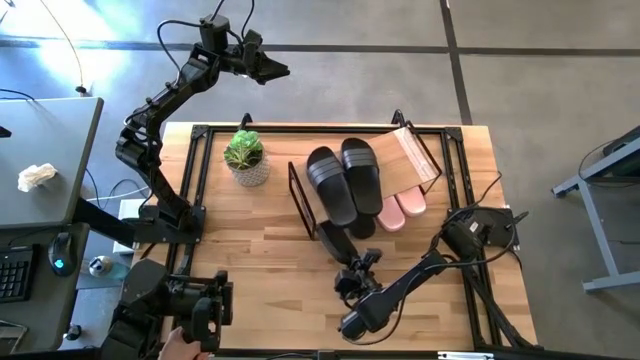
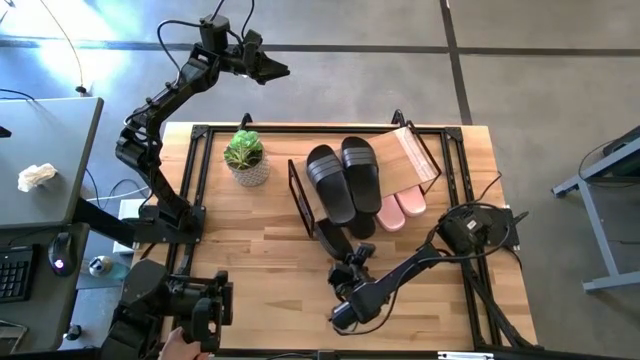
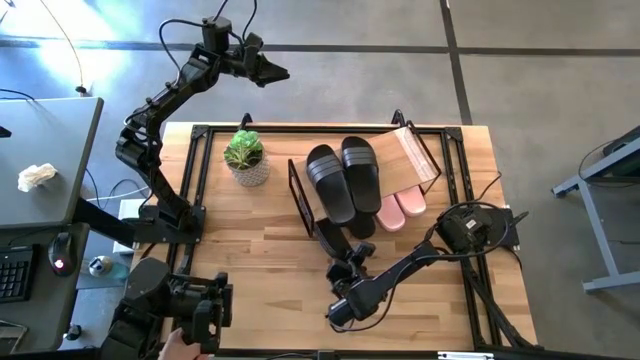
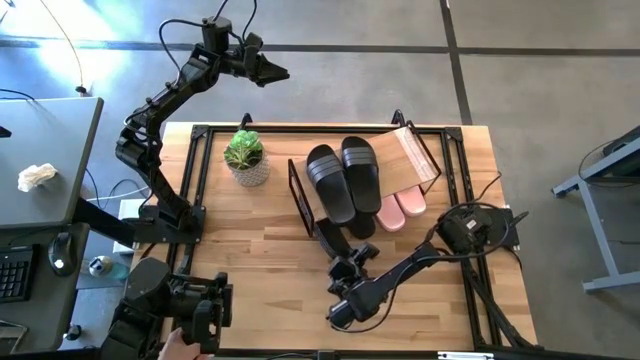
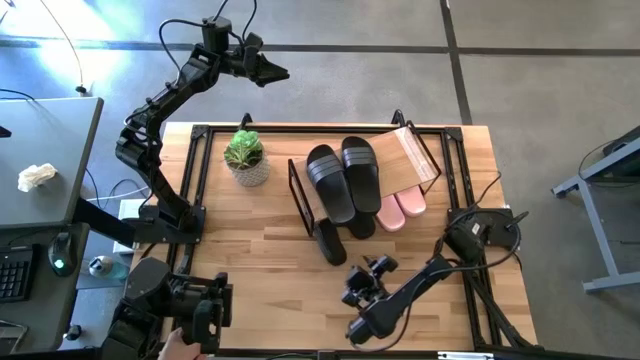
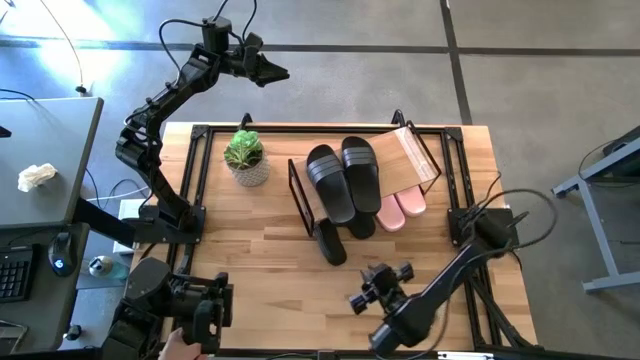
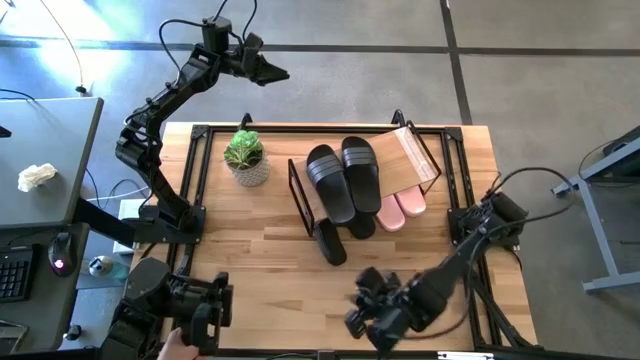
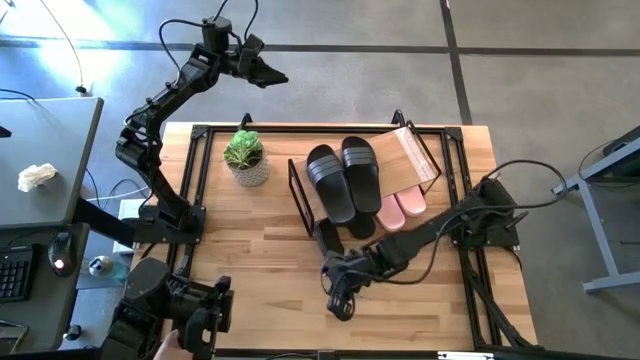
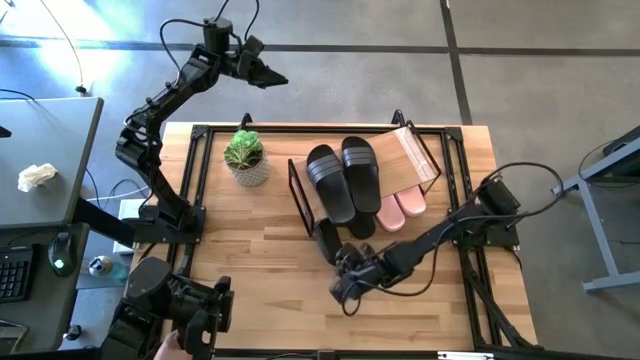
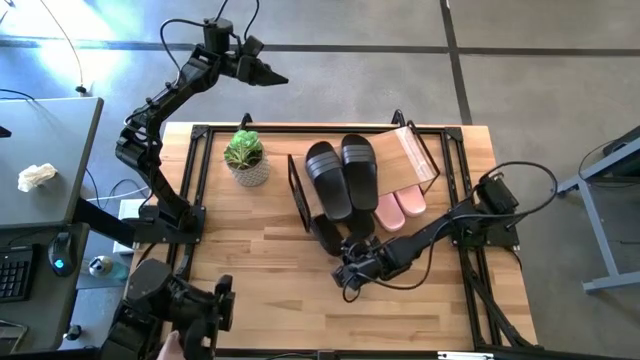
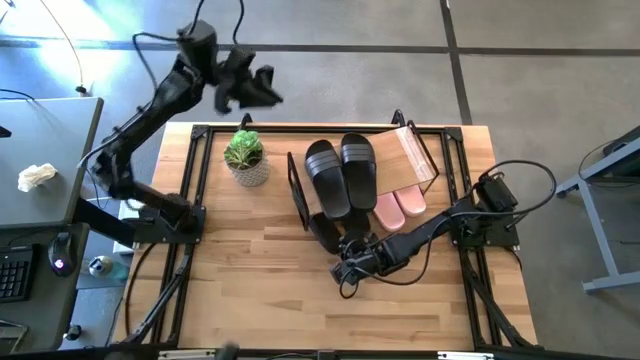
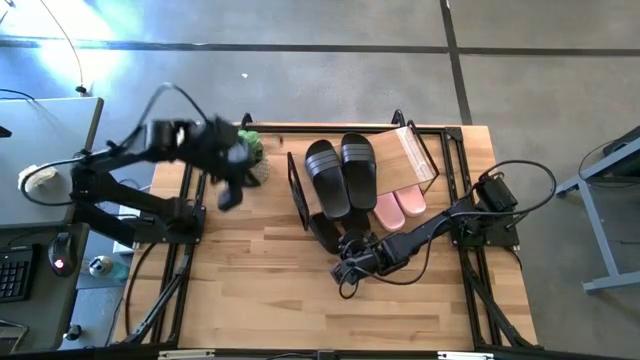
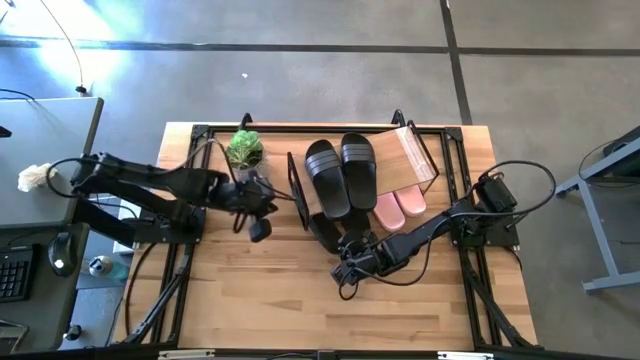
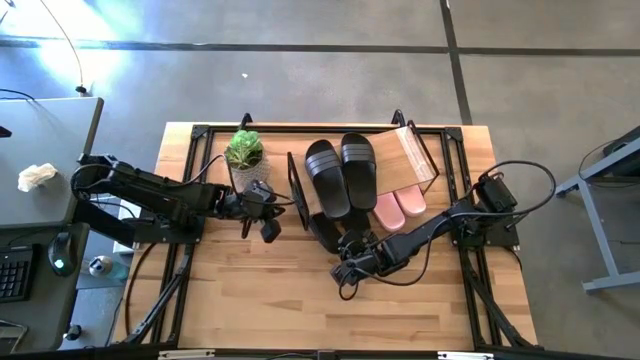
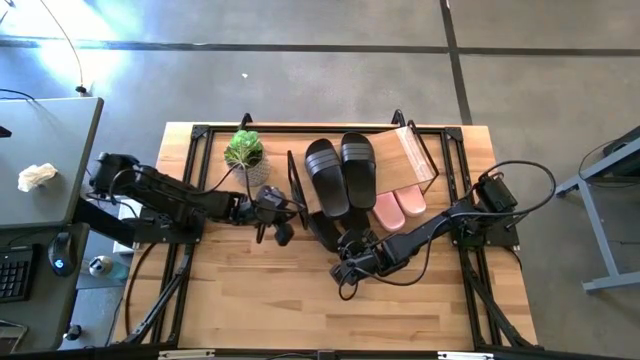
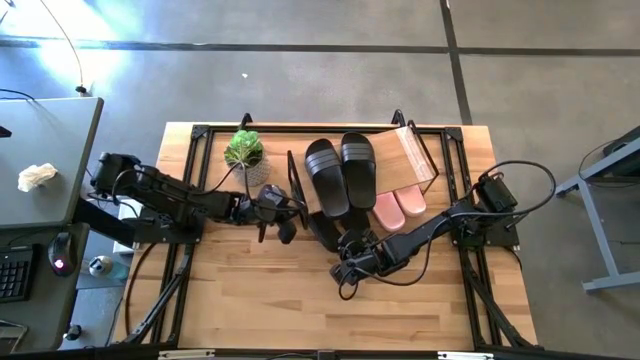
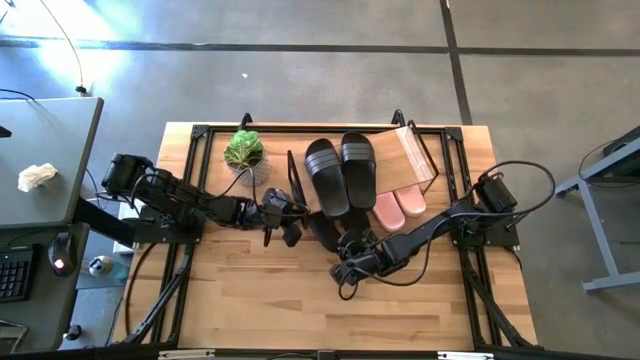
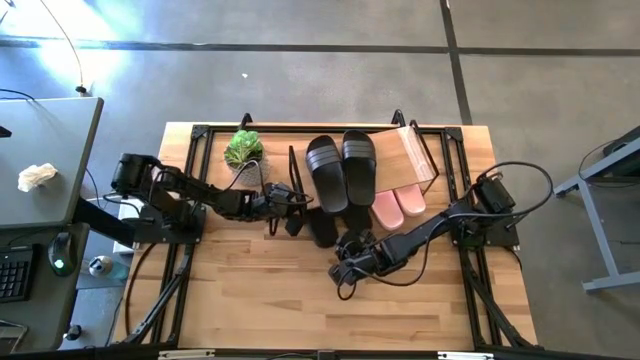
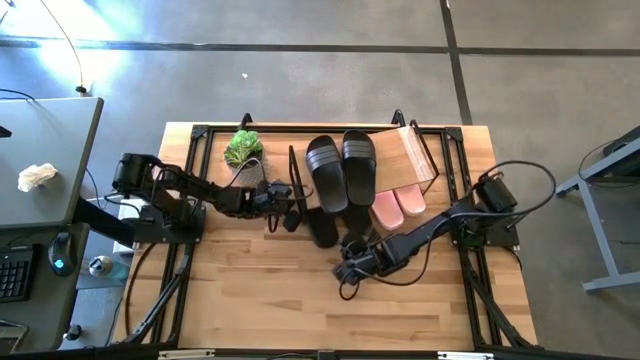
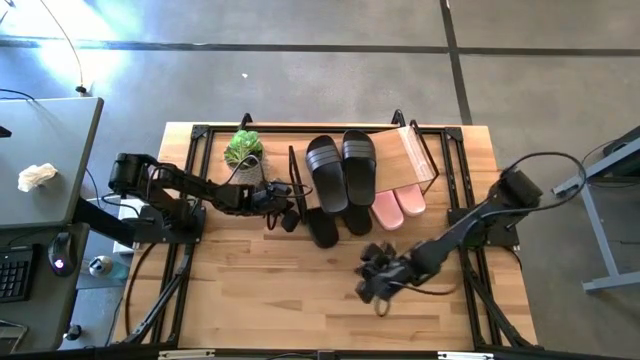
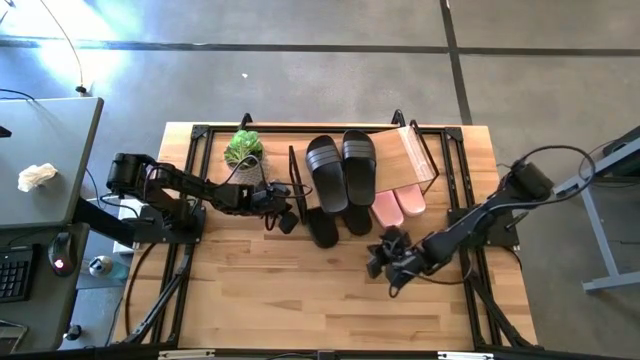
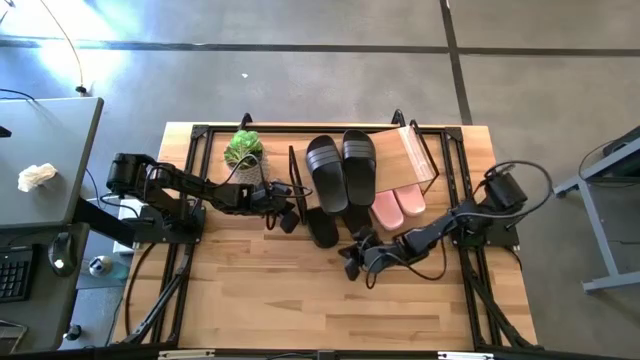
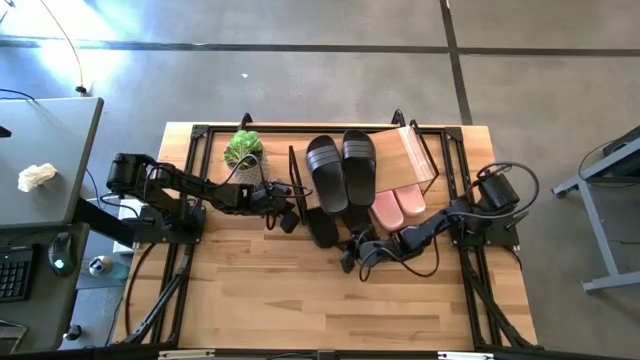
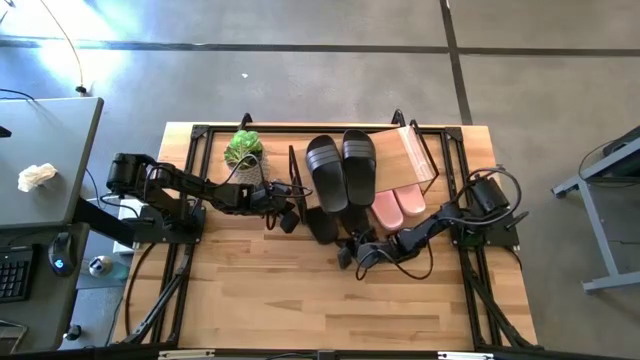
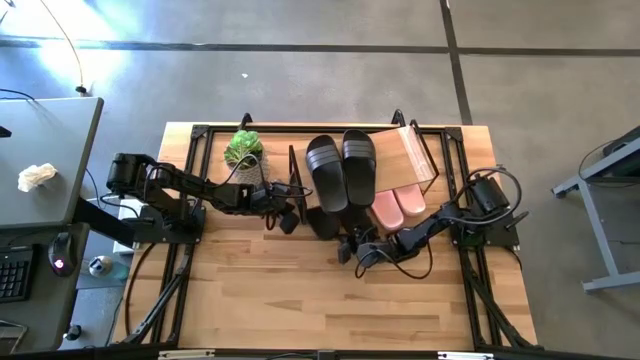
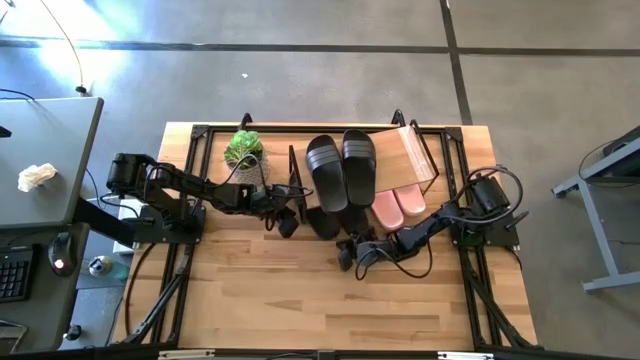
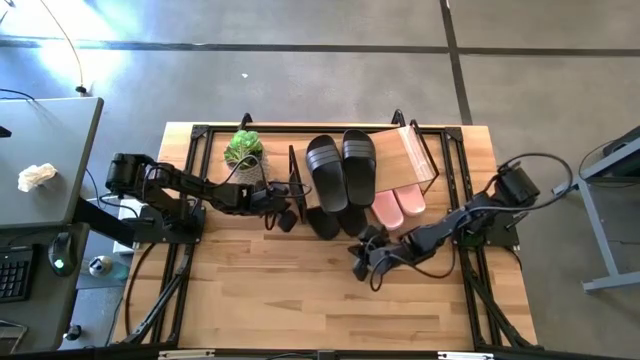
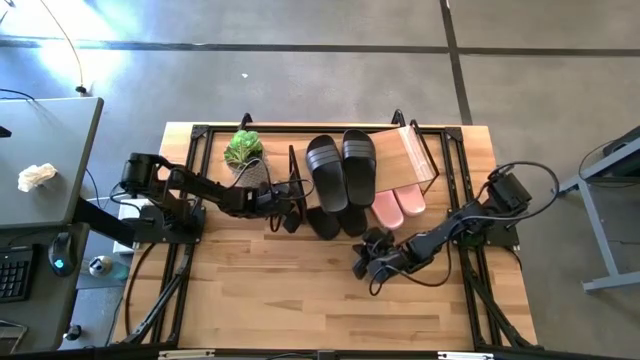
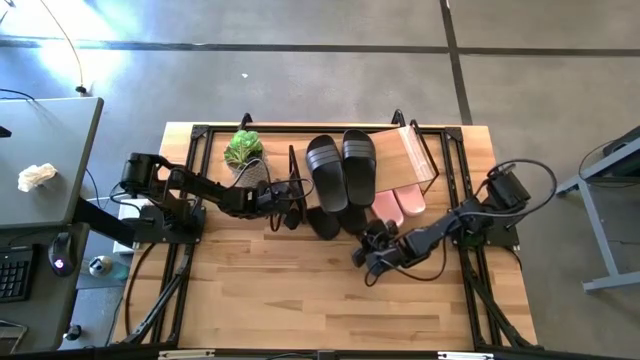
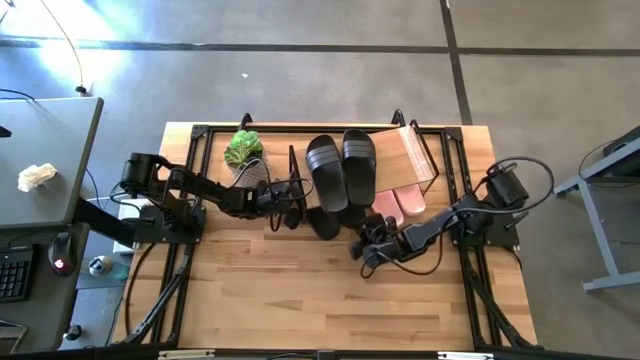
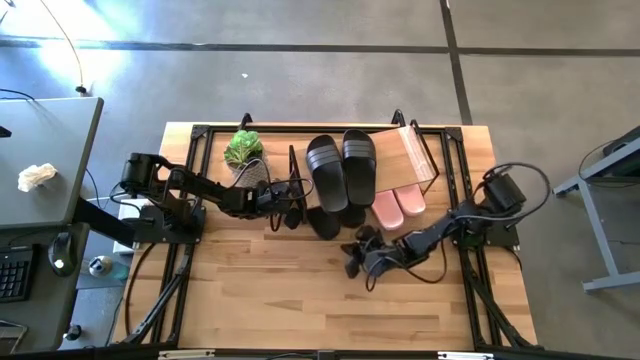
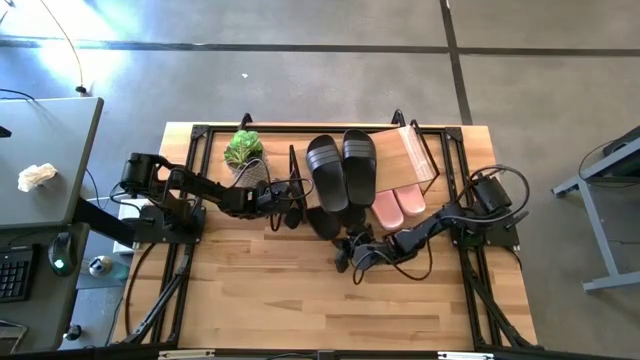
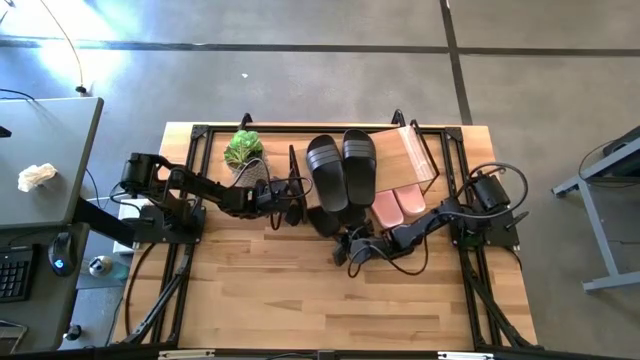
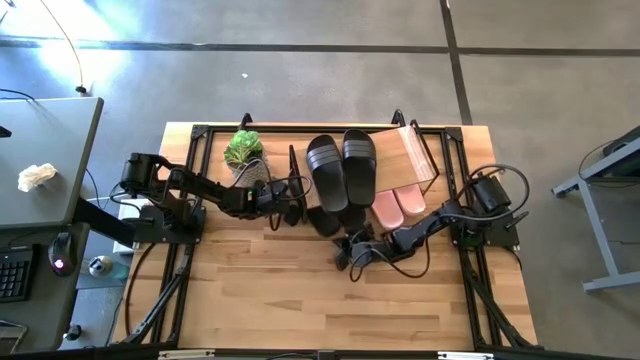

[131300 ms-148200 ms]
Task: Pick and place slides into the shelf
Put the black slipper under the shelf

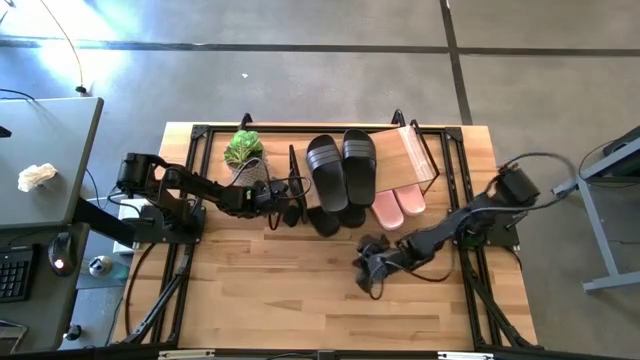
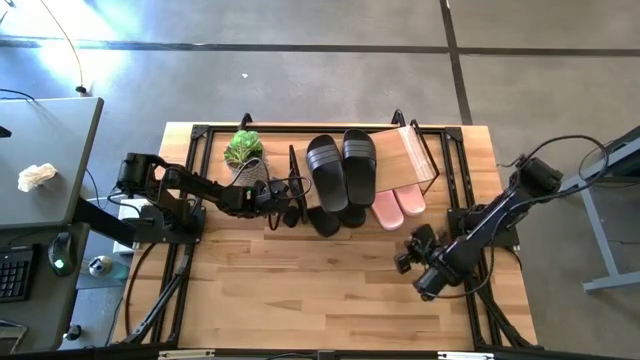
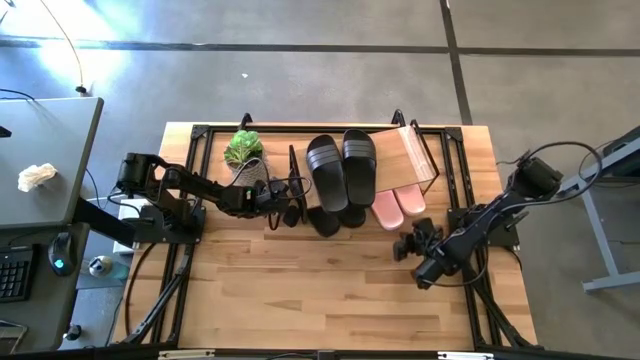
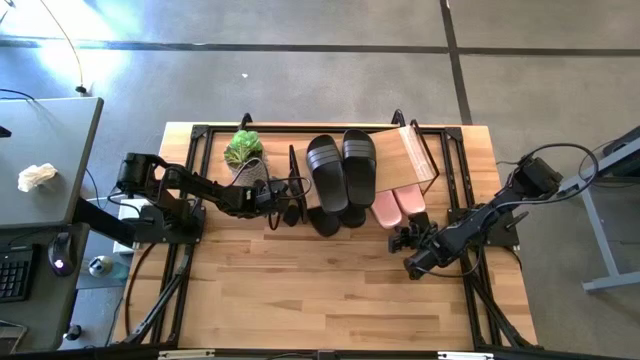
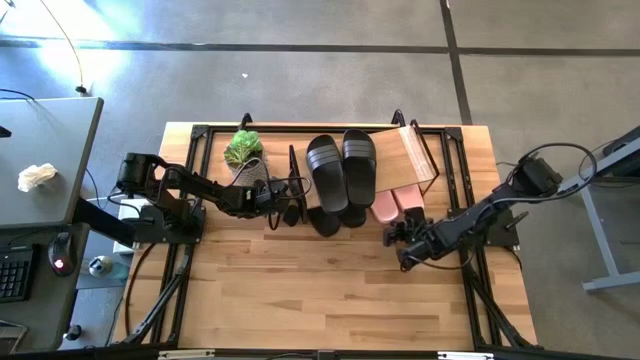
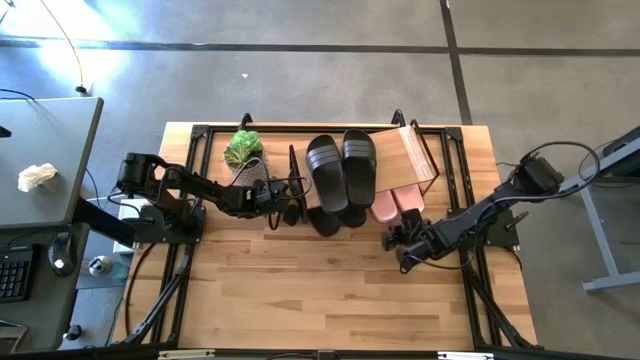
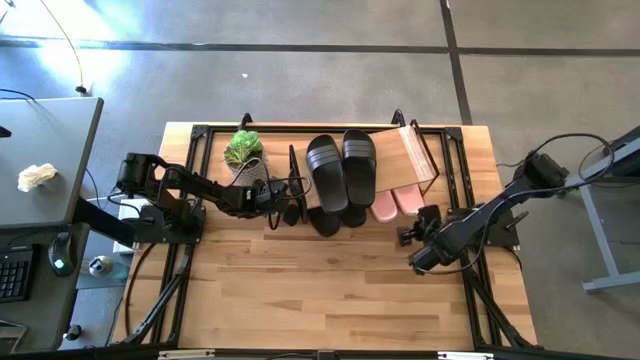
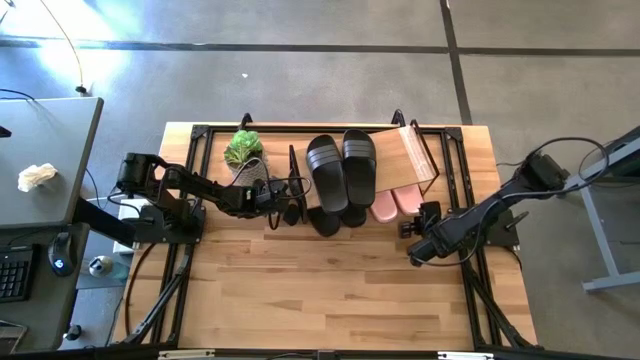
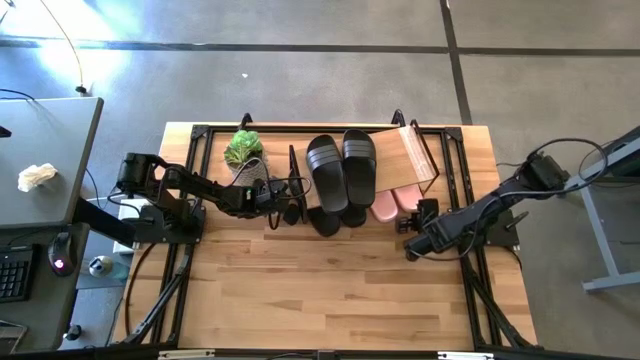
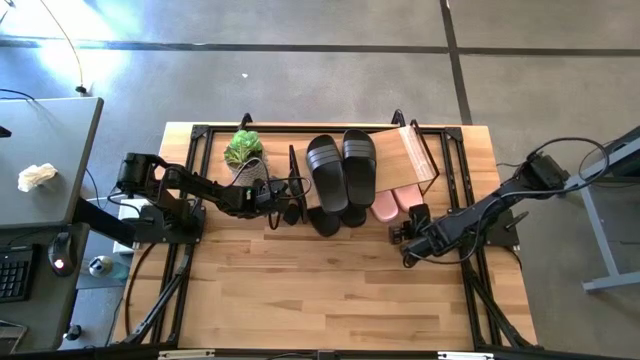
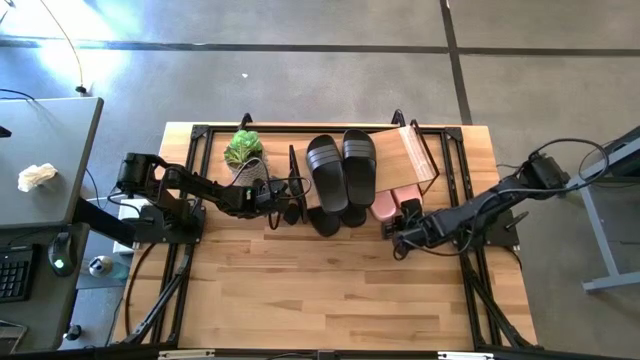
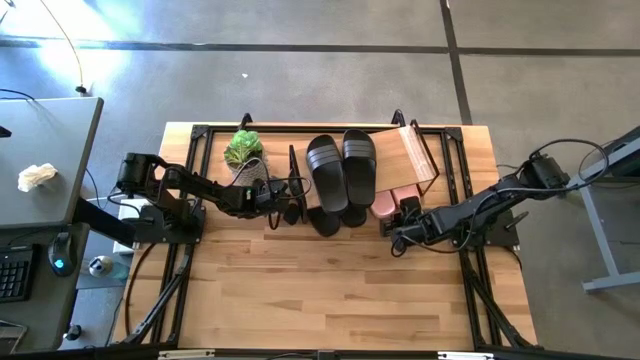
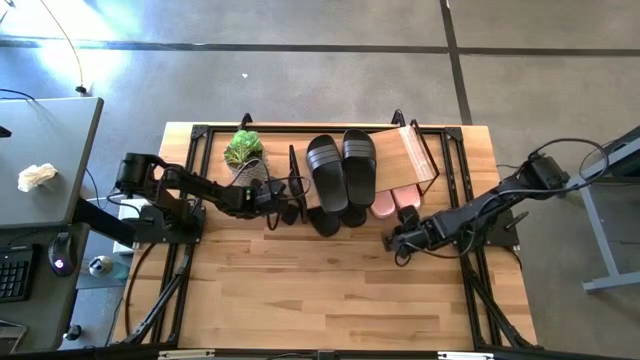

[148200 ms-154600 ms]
Adjust the pink slipper under the shelf
